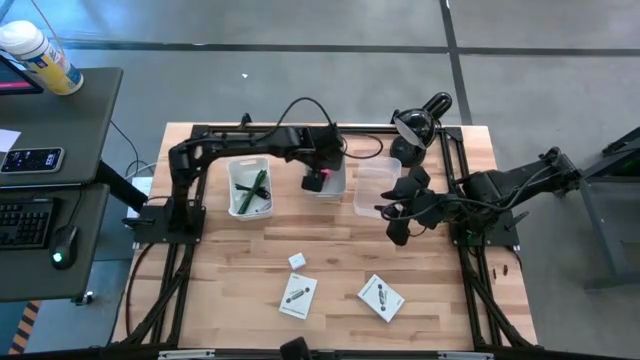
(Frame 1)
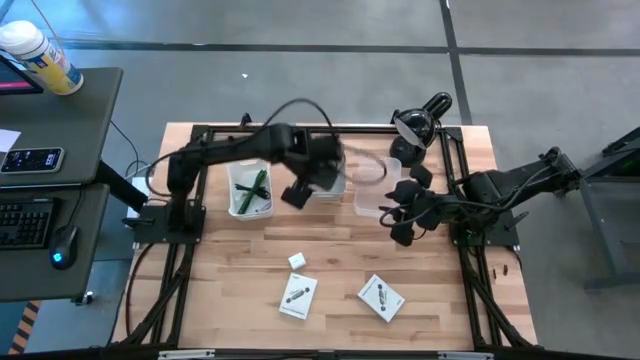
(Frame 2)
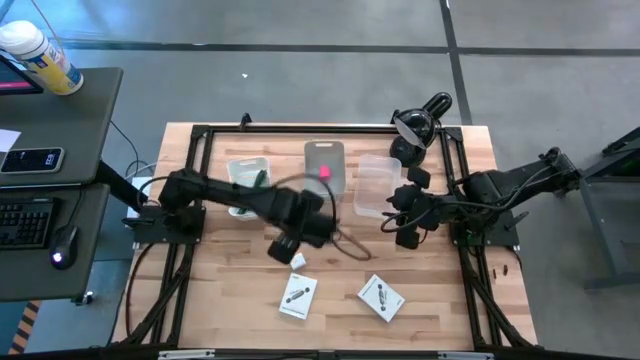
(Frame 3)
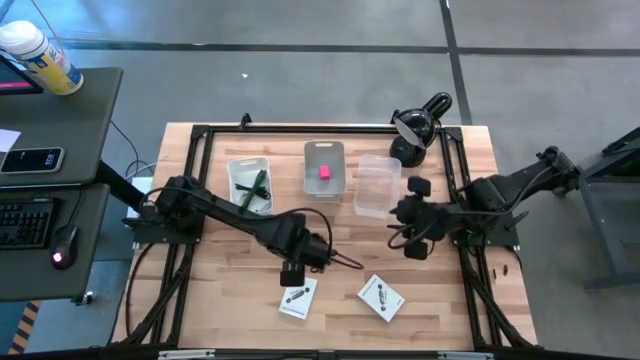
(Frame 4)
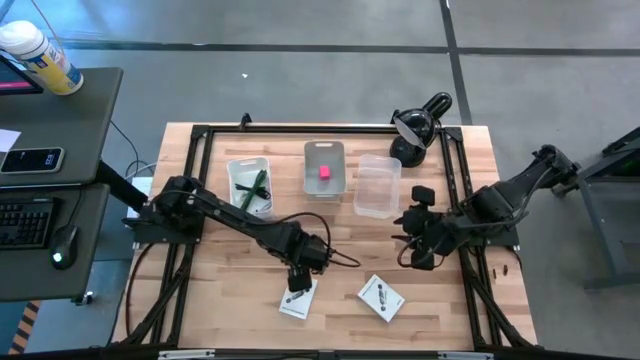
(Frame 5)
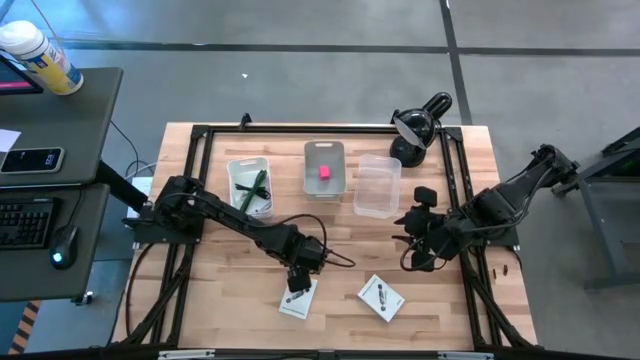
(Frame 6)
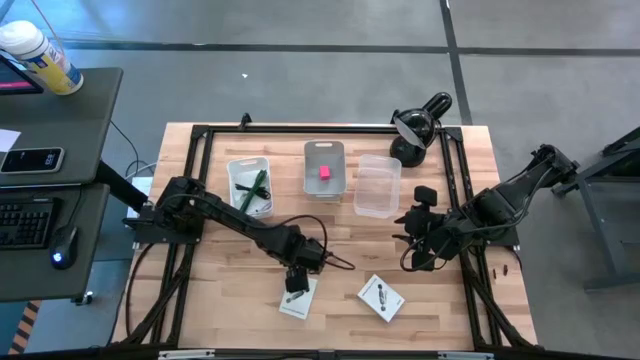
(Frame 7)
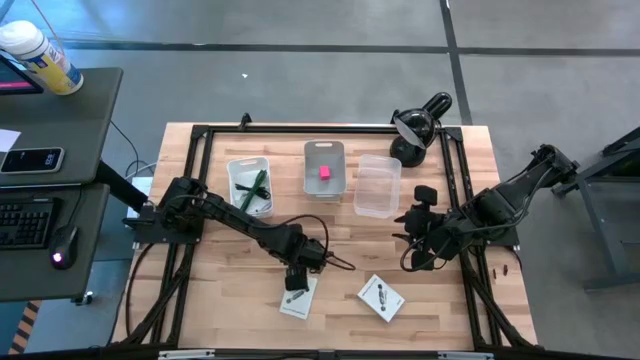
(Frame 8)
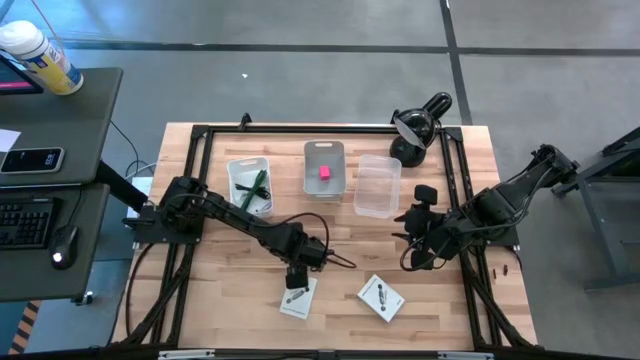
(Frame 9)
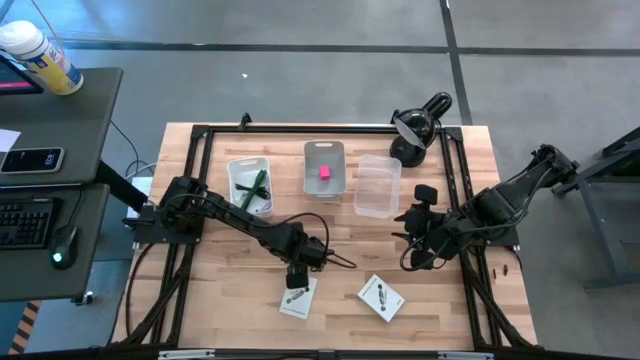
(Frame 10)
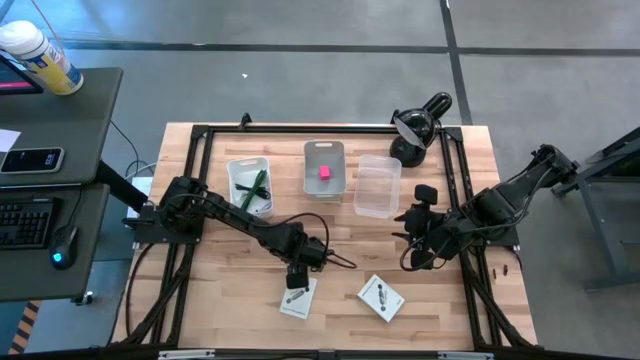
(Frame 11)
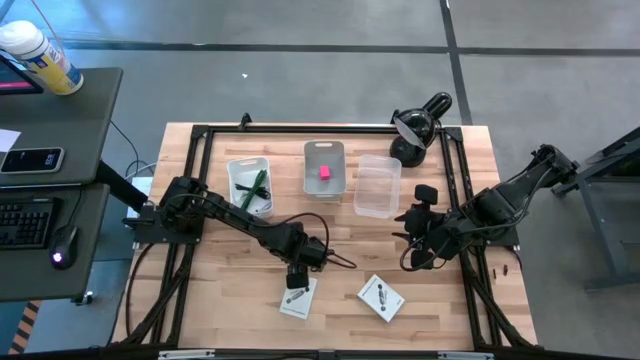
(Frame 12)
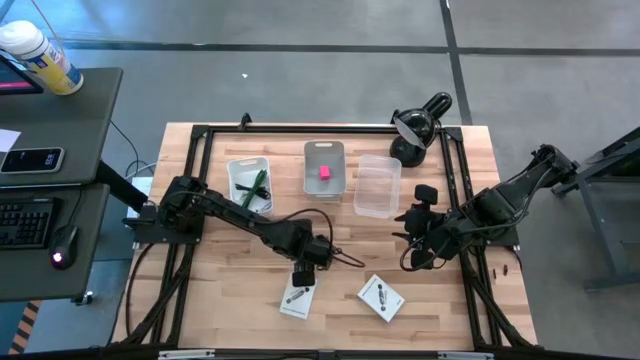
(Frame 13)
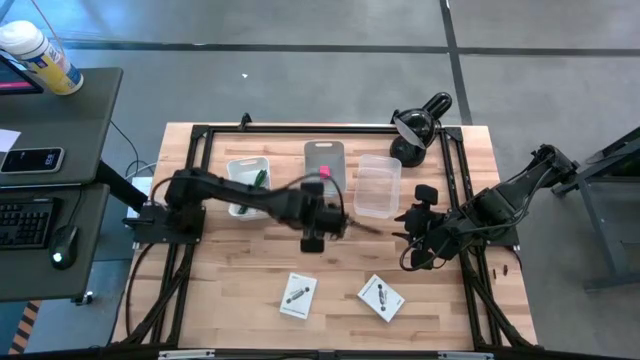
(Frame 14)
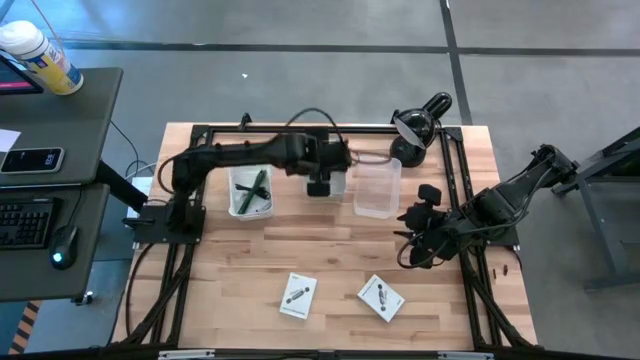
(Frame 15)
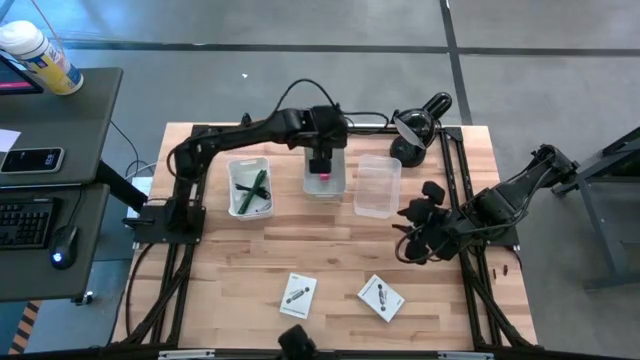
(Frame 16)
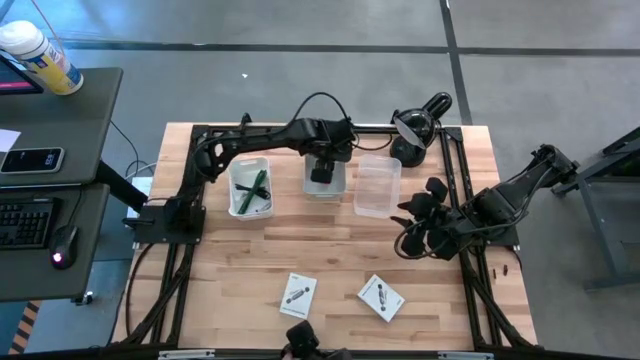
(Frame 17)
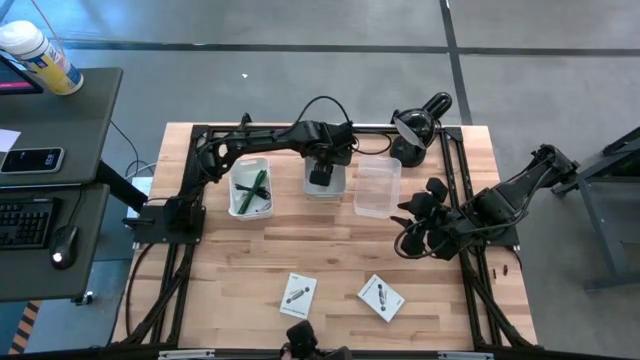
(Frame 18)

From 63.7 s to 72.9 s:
Task: Pick and place items into bin
Put the white charger adapter into the gray bin

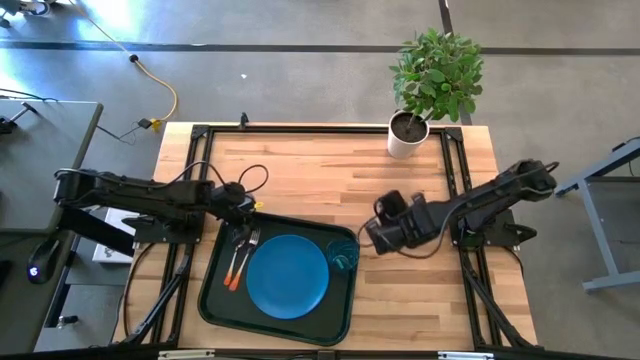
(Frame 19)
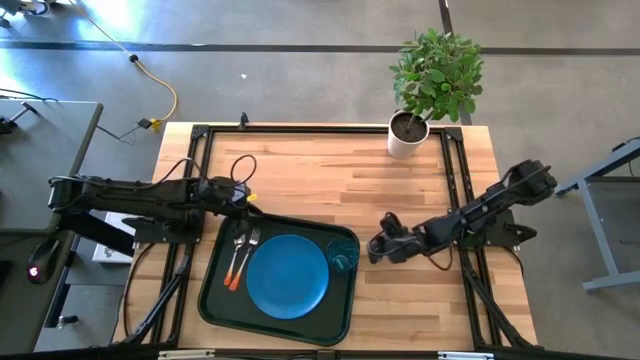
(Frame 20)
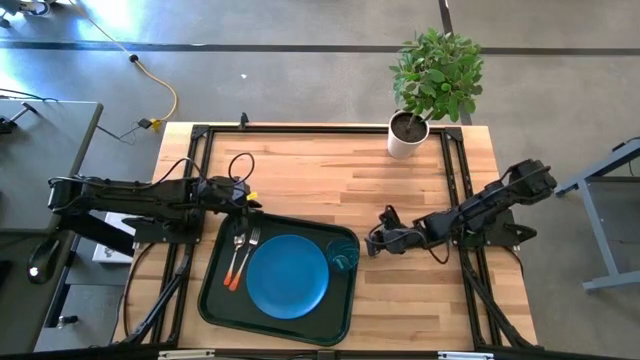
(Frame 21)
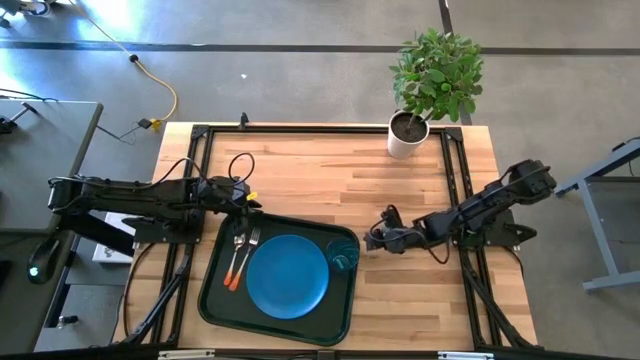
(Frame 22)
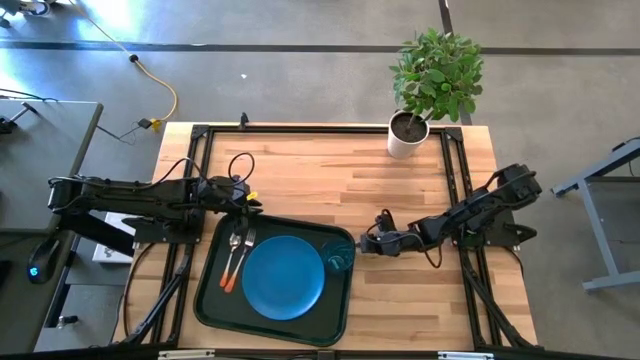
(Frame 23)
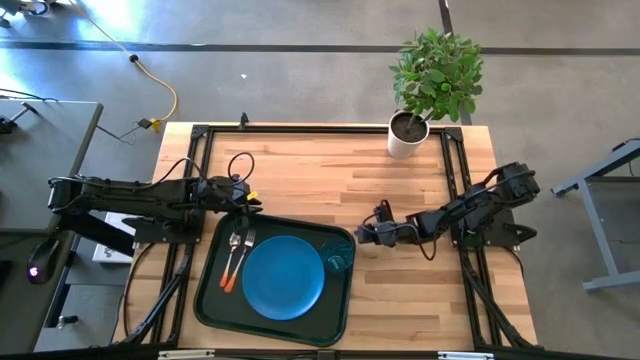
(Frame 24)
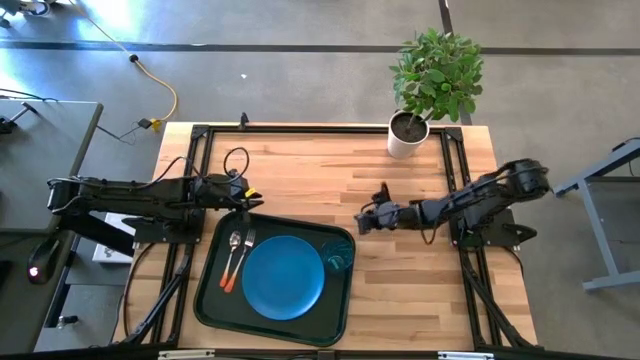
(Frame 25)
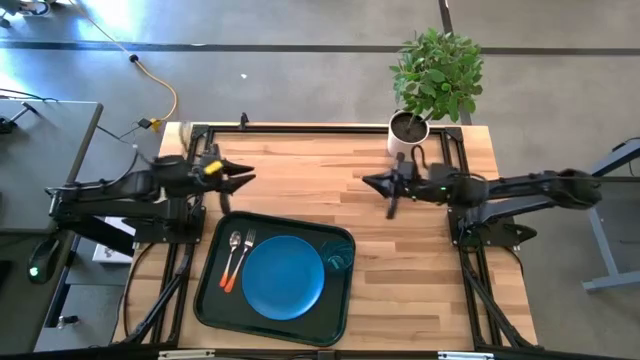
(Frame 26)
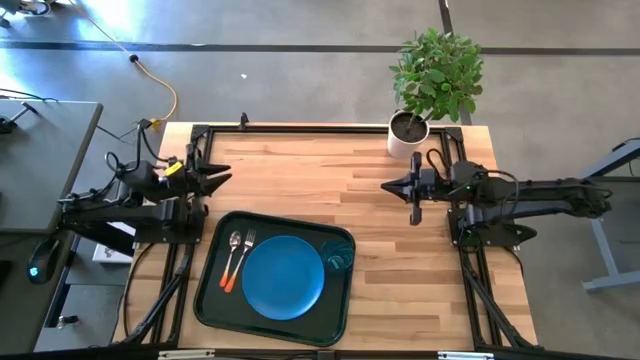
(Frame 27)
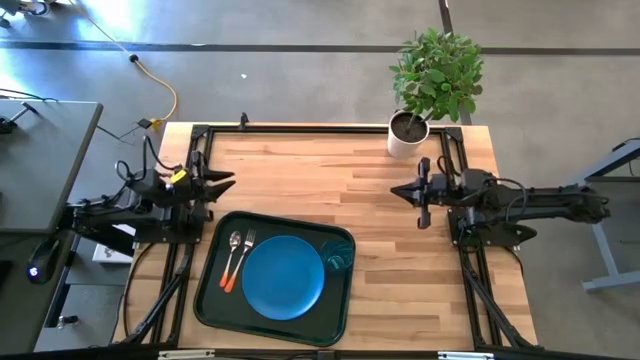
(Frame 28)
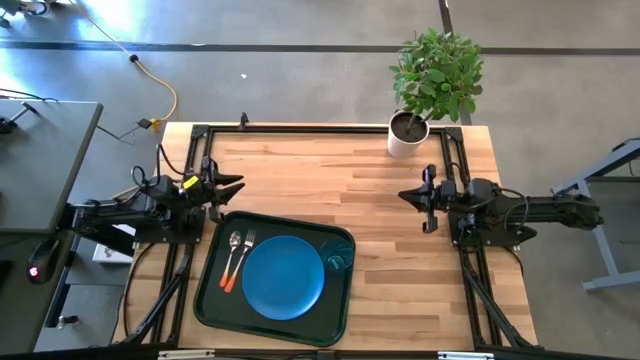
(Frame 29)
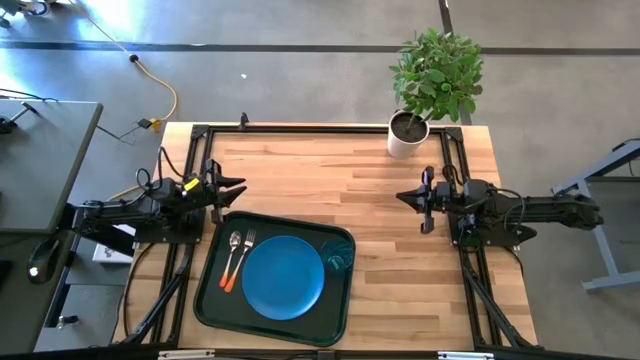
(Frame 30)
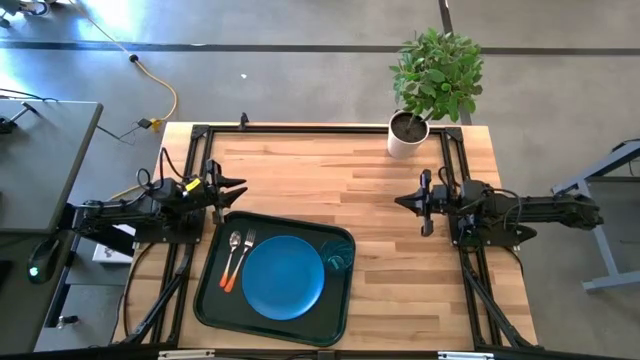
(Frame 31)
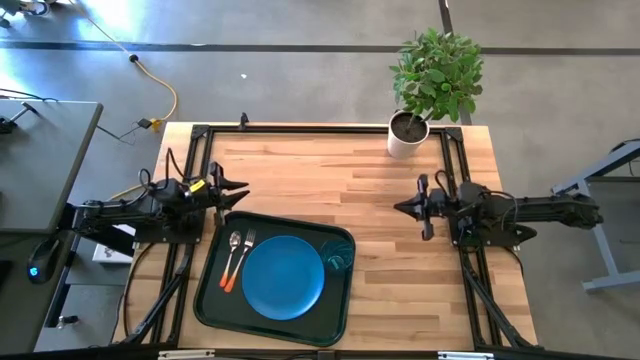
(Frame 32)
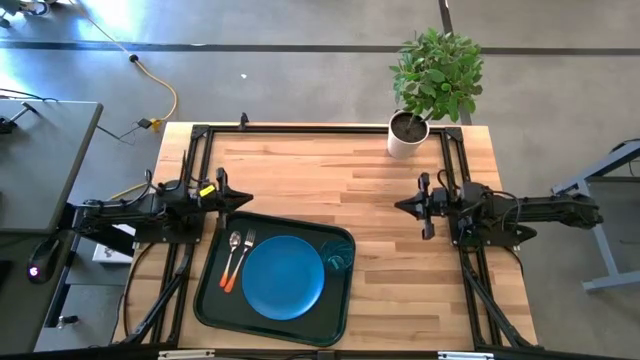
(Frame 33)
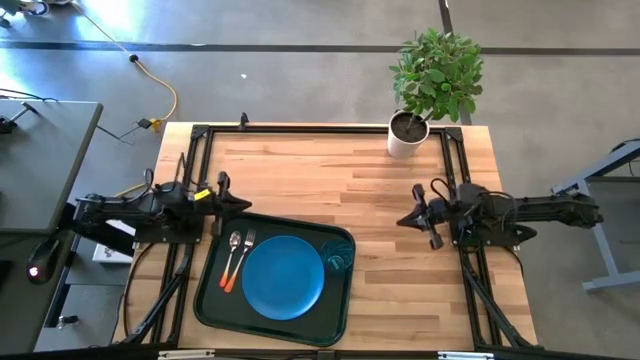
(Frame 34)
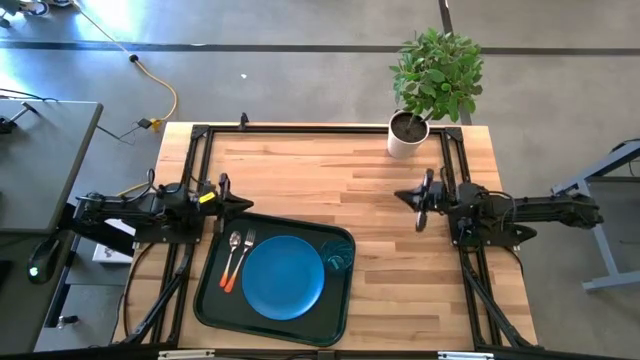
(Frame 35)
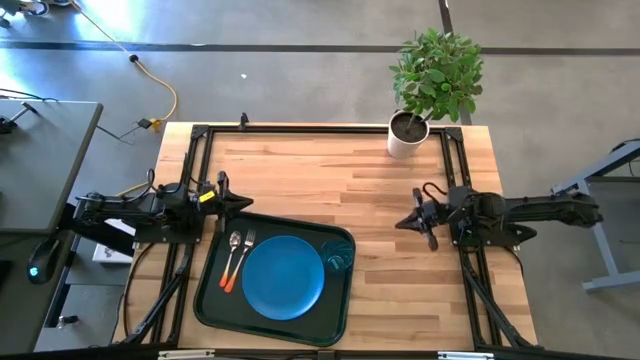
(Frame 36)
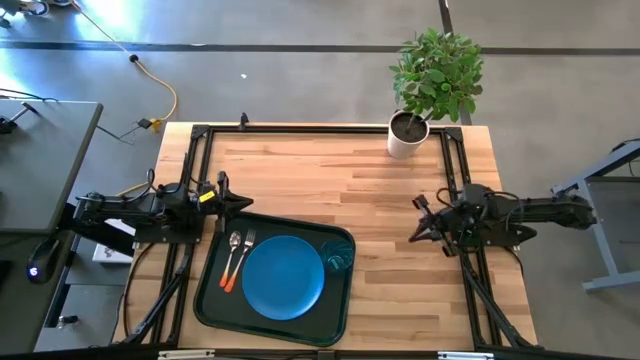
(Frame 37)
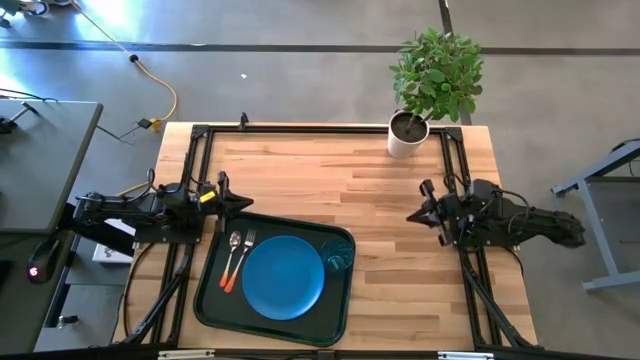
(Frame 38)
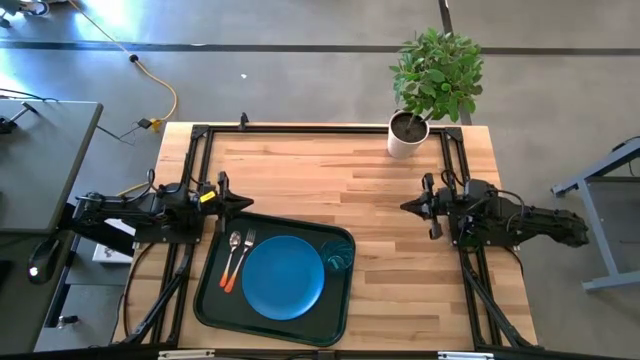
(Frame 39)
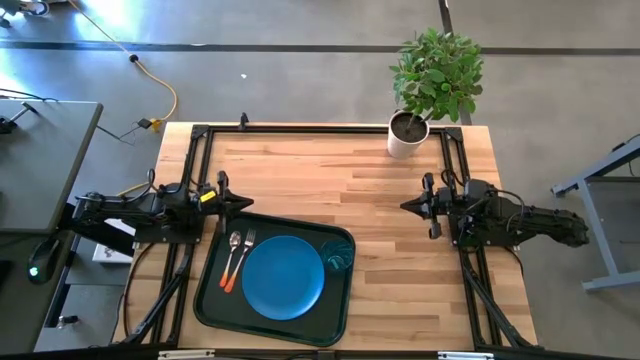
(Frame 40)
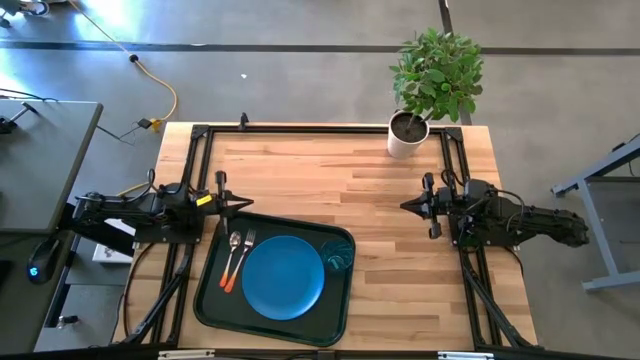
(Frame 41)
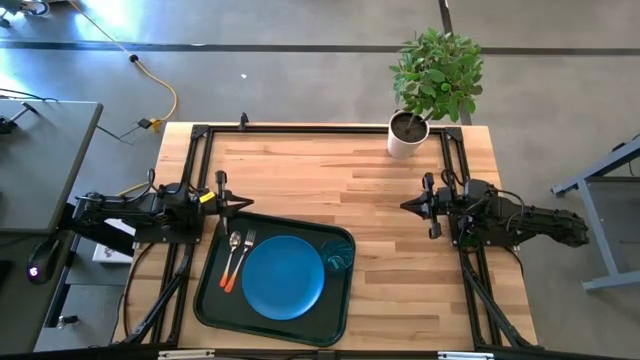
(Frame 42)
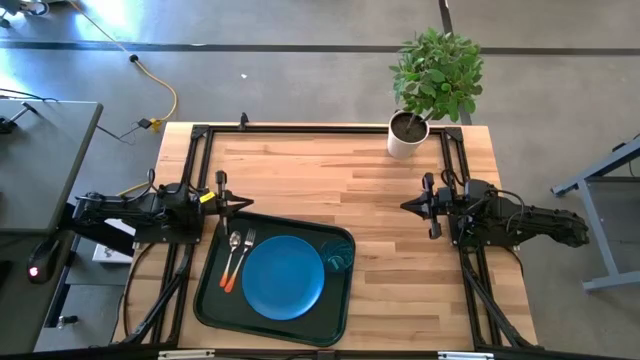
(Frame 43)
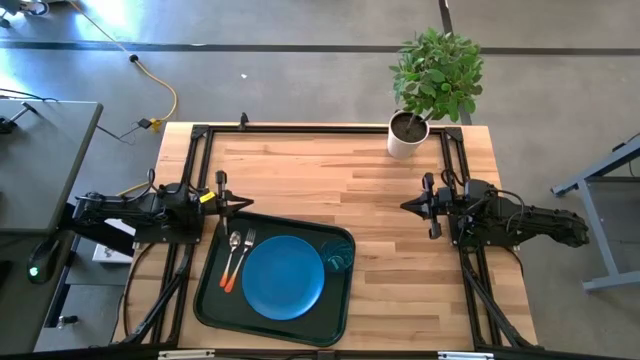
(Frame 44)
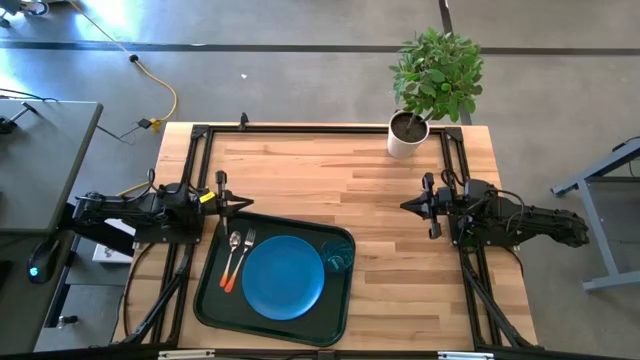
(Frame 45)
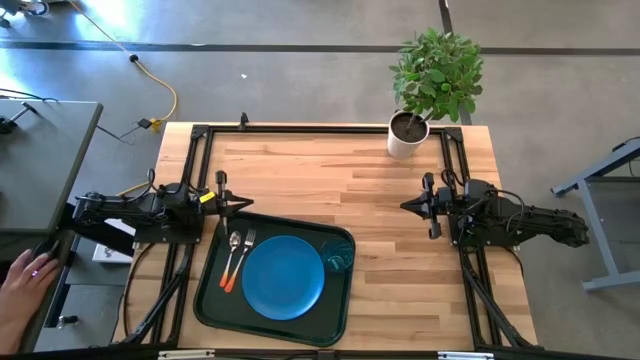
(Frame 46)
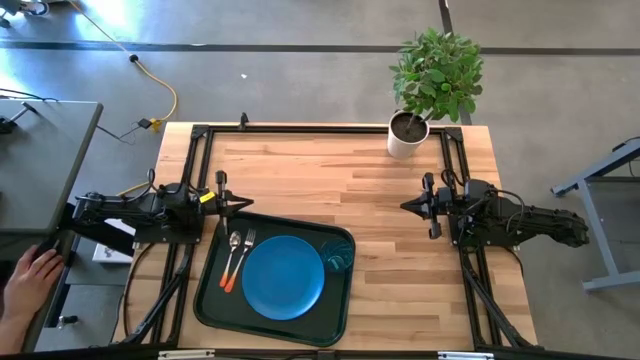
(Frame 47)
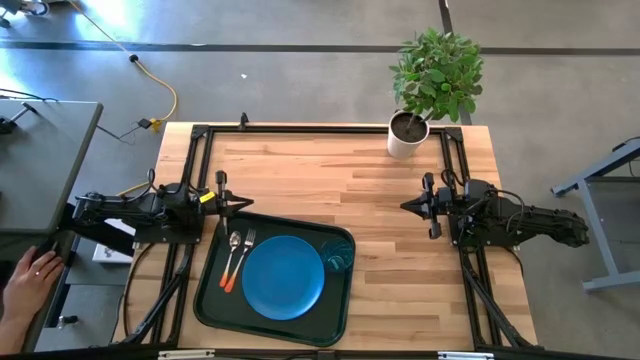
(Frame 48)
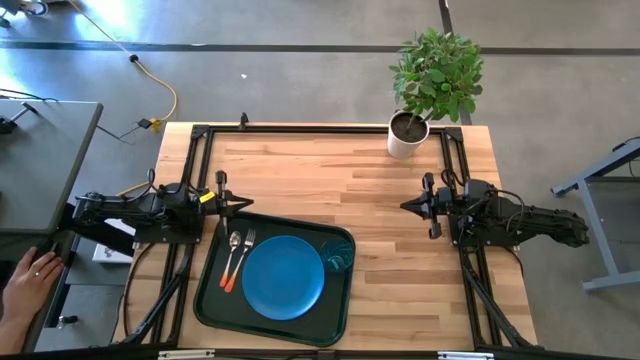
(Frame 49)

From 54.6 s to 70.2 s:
Task: Pick and place plate/cup/fork/spoon on tray
Return to Home Position
